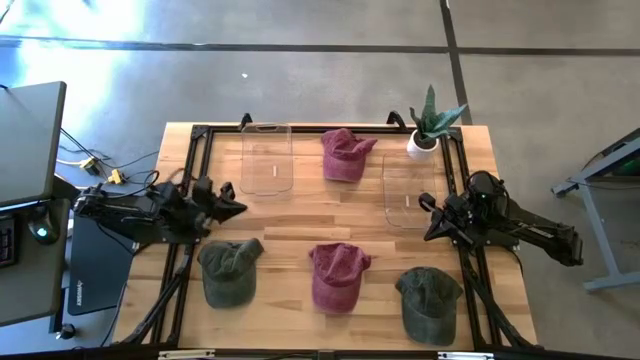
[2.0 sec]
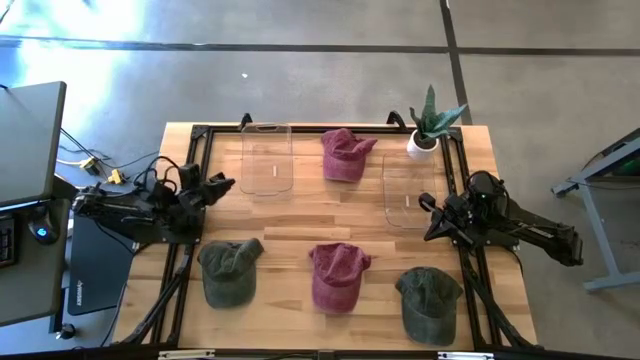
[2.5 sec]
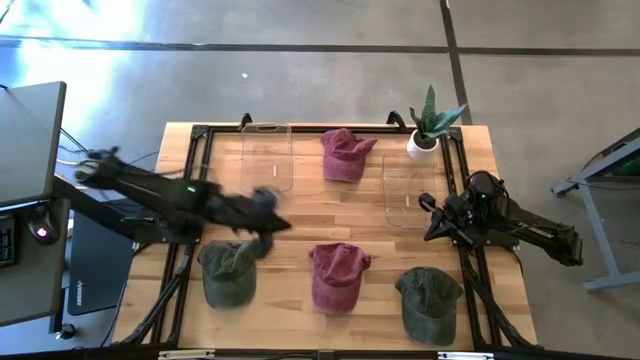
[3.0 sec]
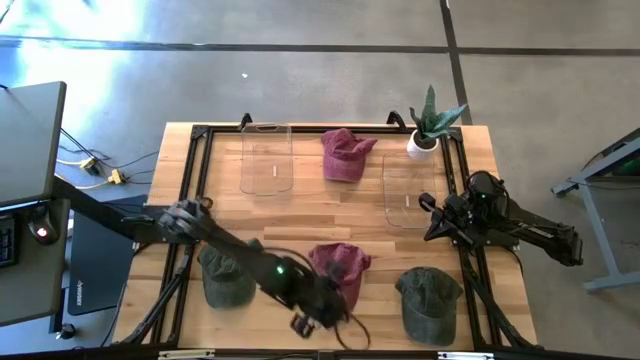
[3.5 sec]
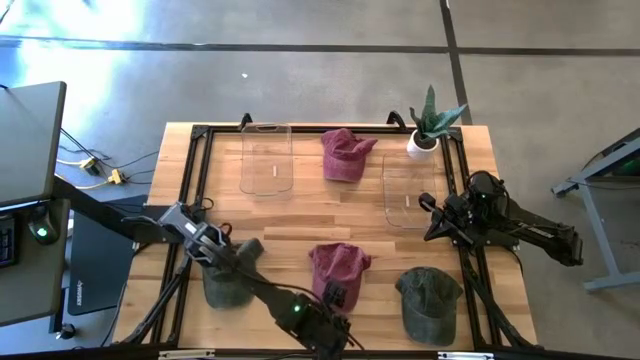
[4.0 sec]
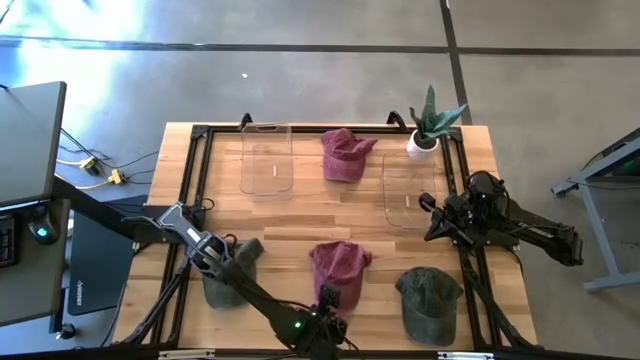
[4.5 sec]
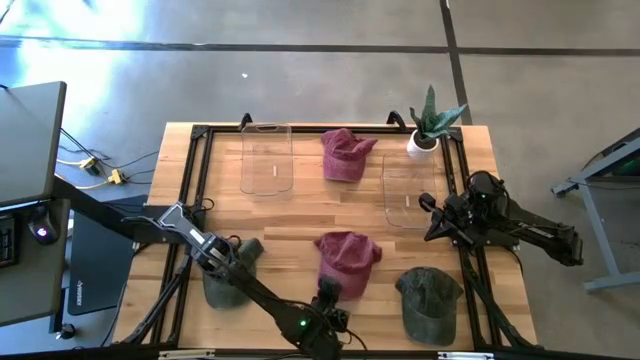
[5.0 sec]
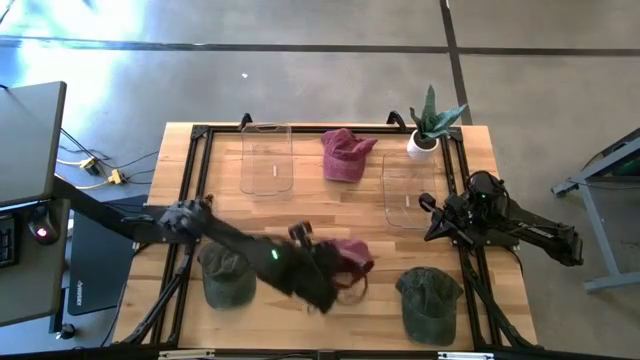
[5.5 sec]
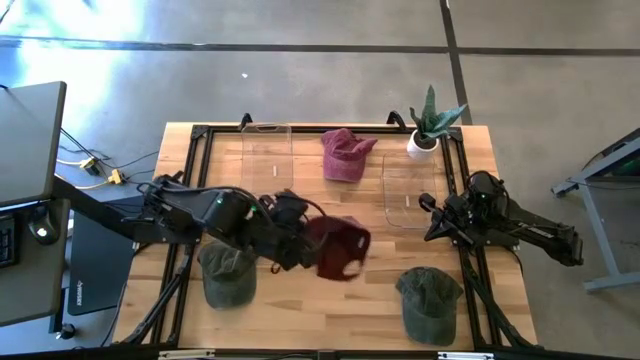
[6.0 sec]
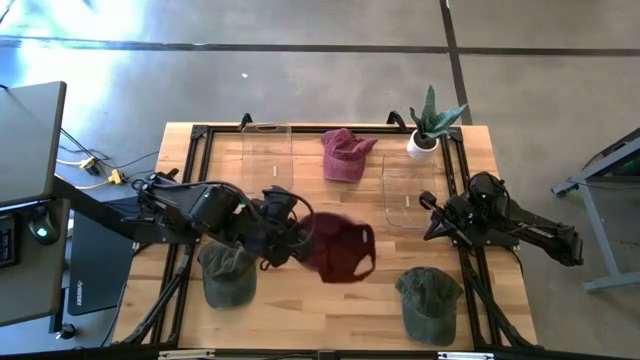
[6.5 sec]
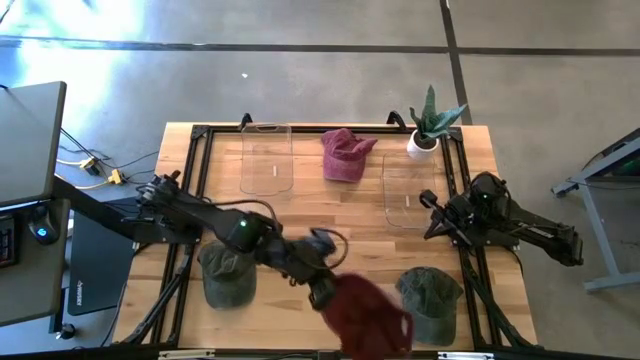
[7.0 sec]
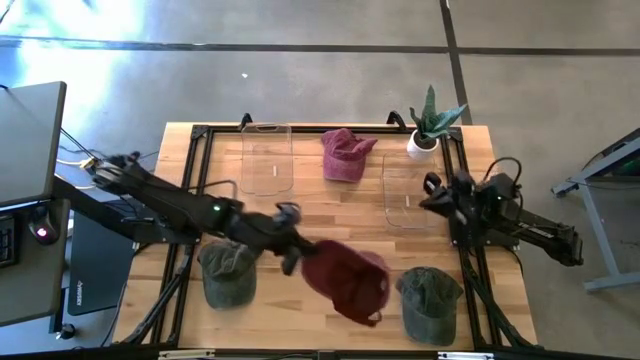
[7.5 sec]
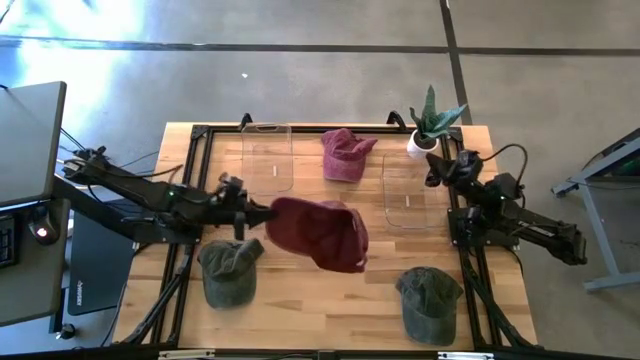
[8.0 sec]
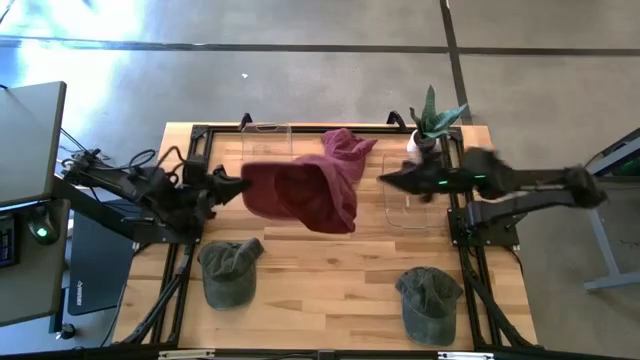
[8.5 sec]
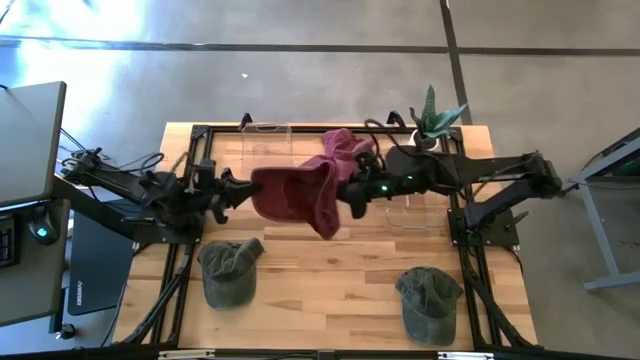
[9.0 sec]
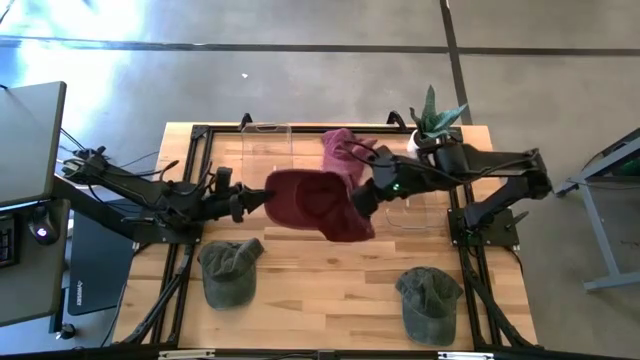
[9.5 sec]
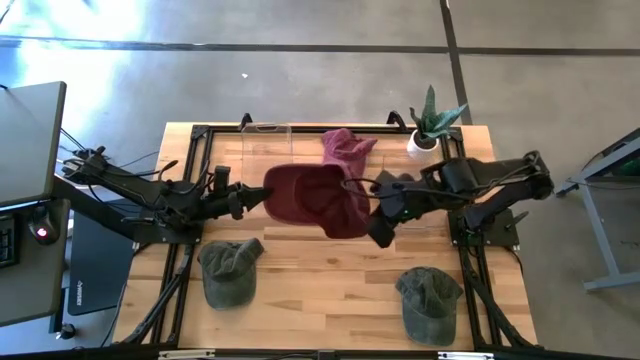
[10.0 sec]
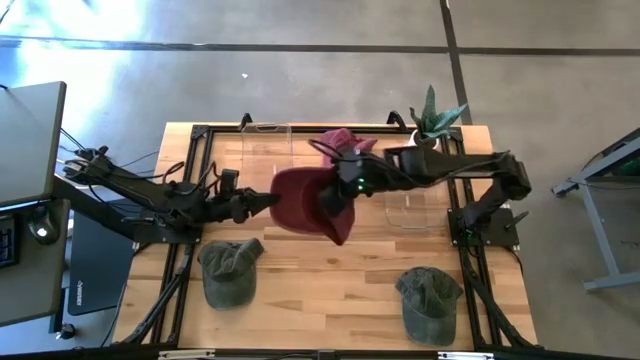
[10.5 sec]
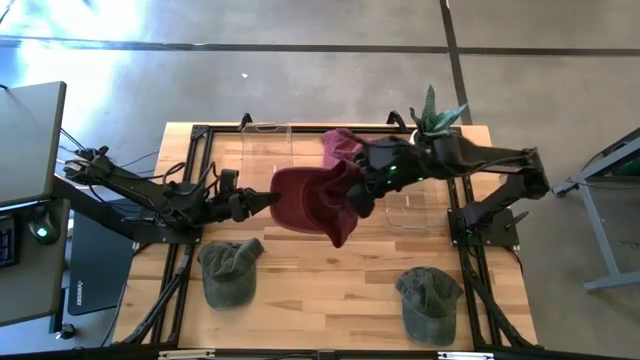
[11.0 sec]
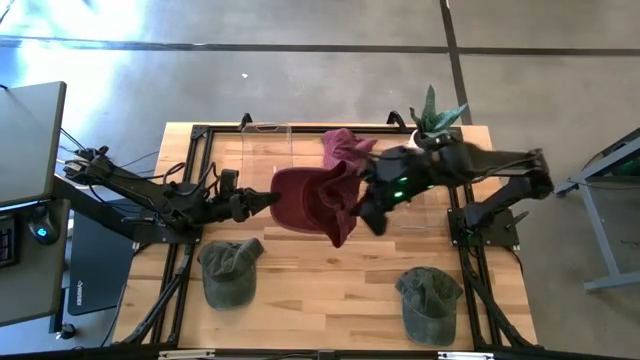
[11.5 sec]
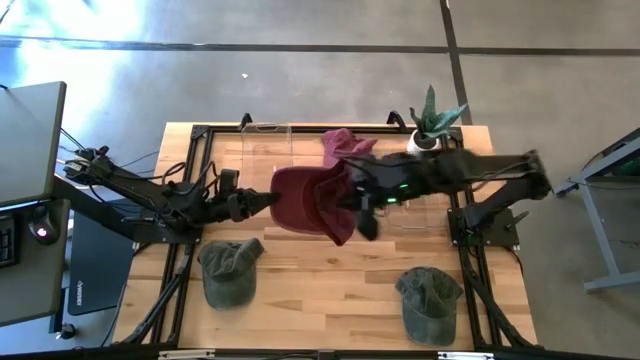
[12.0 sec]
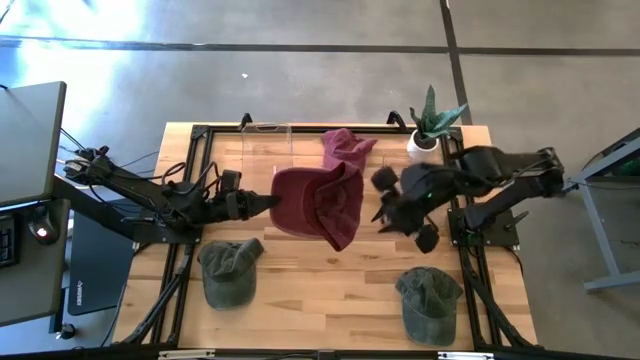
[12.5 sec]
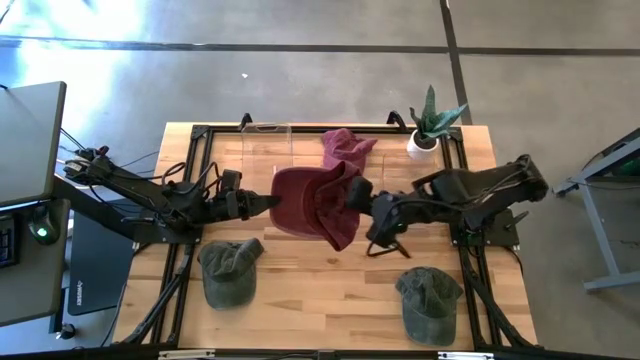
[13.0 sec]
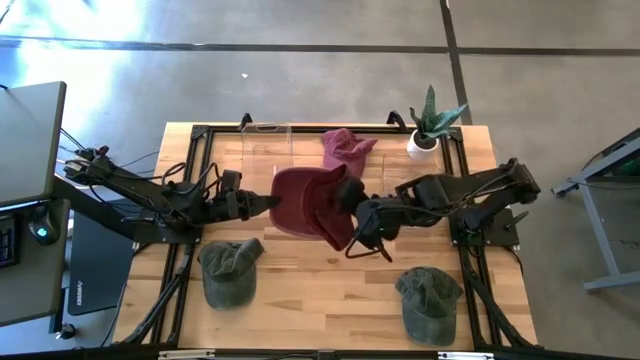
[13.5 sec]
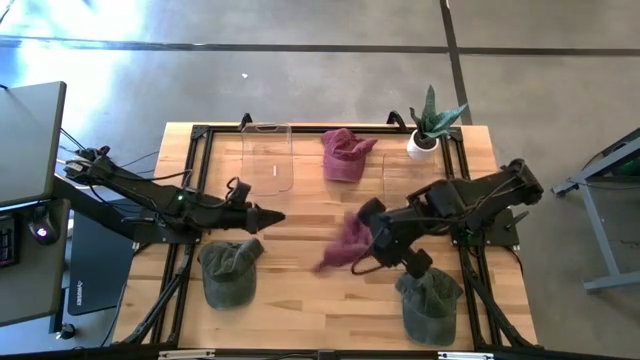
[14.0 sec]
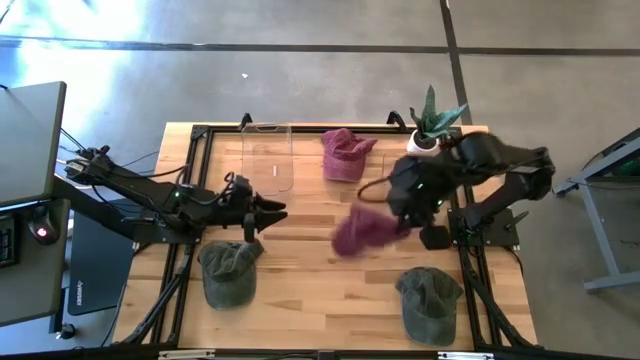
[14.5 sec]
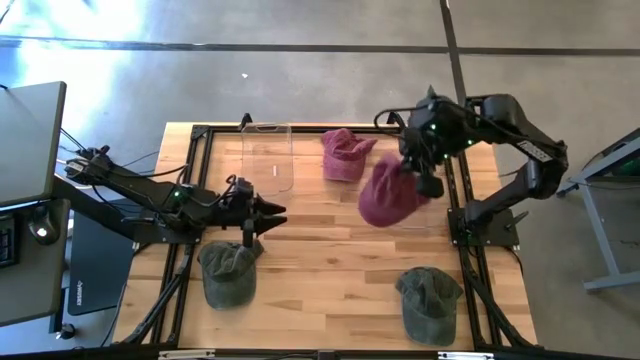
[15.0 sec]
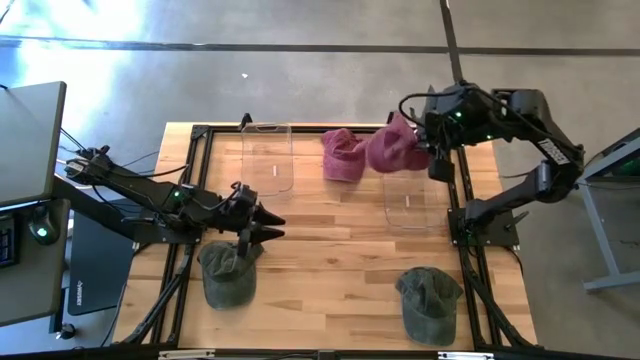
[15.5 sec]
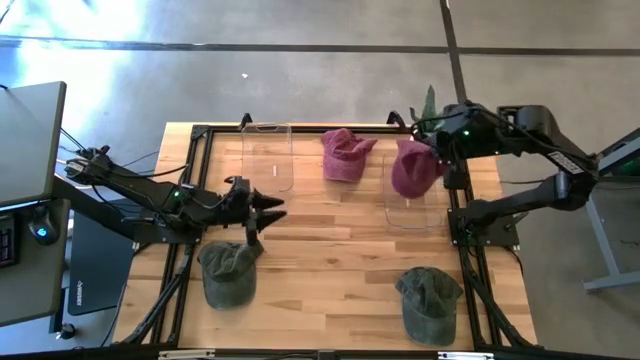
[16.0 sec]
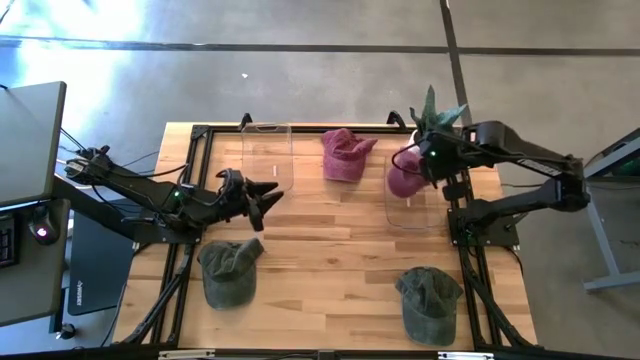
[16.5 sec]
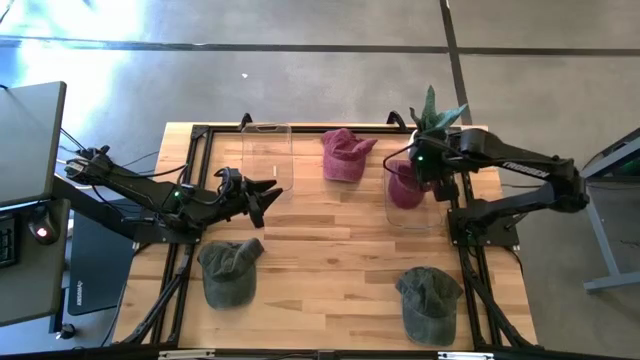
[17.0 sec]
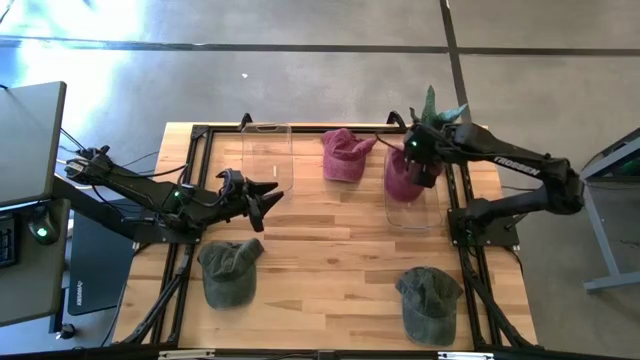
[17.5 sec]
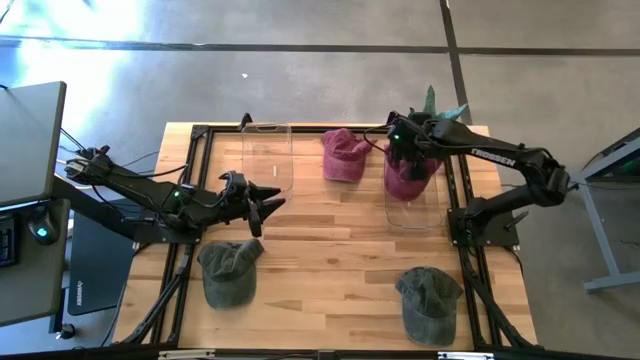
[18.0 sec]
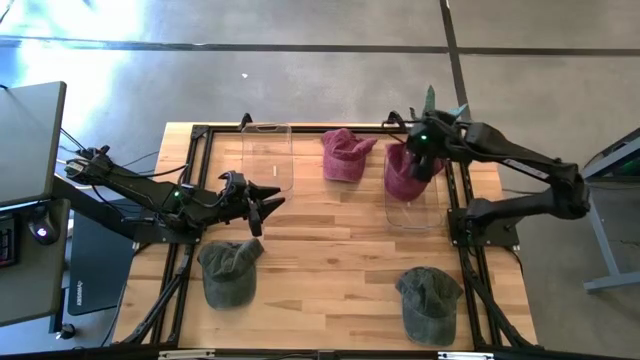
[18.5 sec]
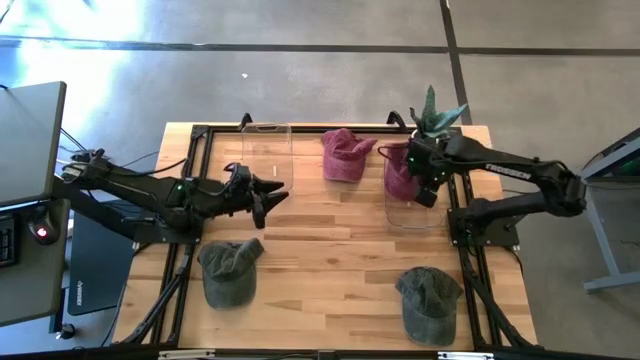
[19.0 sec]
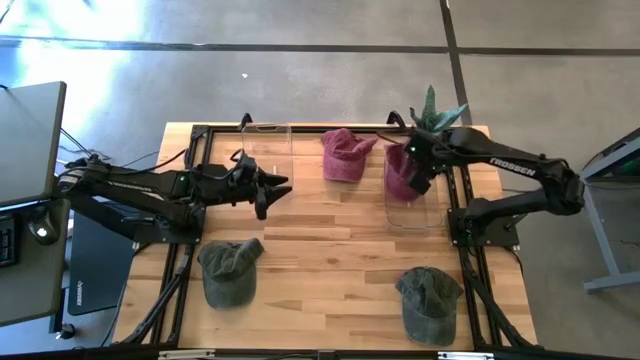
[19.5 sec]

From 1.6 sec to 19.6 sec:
Task: Pick & Place hat
Put the bottom red cap into the right transparent bin
